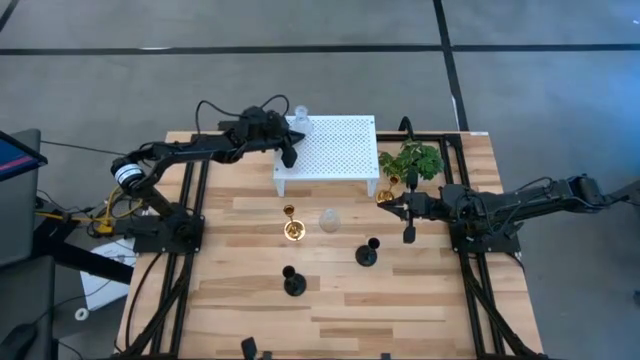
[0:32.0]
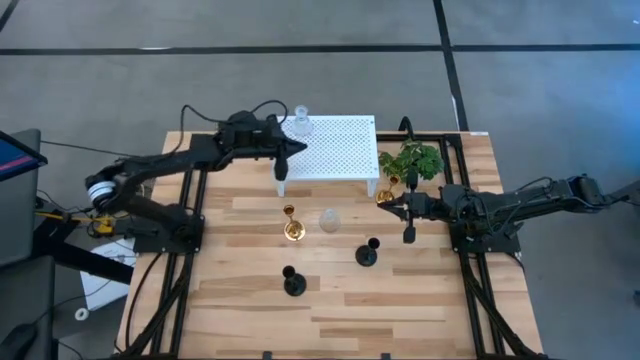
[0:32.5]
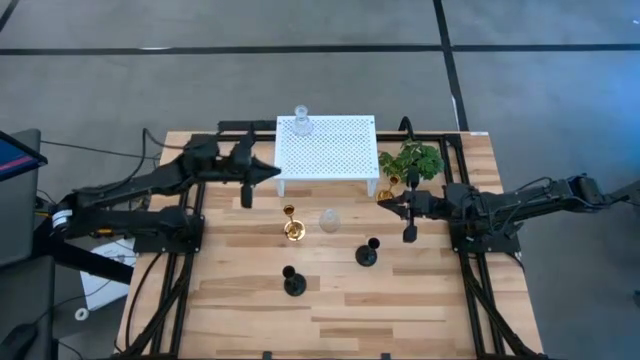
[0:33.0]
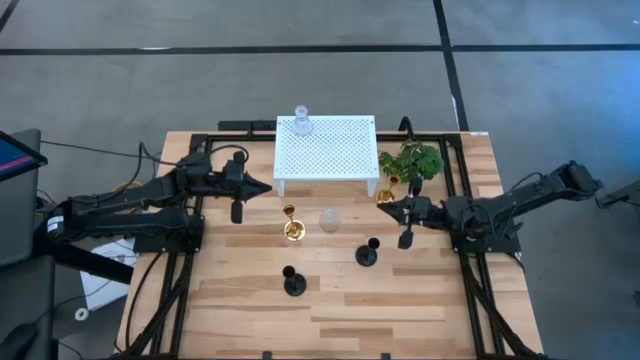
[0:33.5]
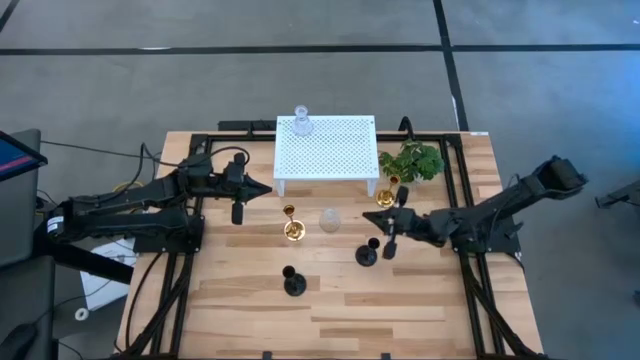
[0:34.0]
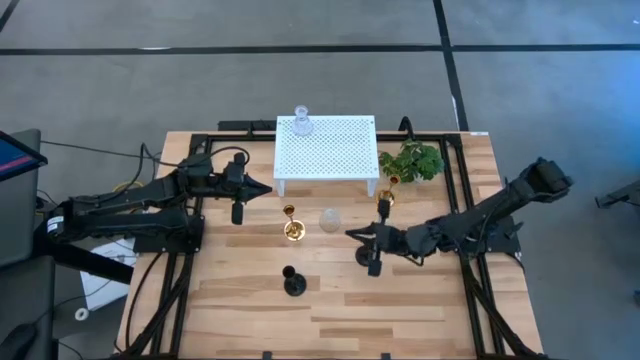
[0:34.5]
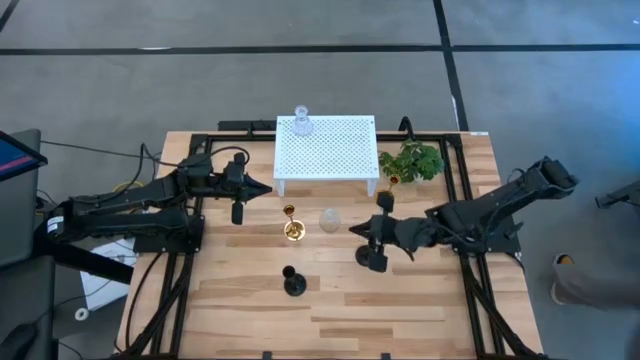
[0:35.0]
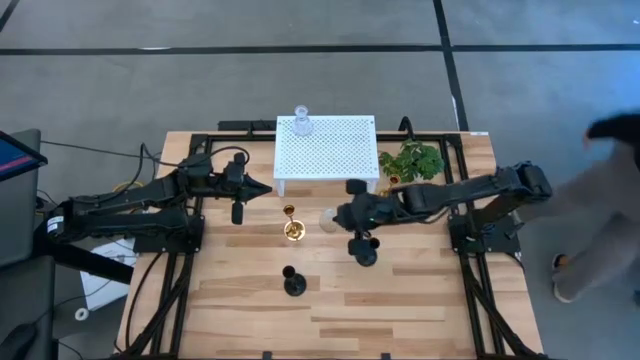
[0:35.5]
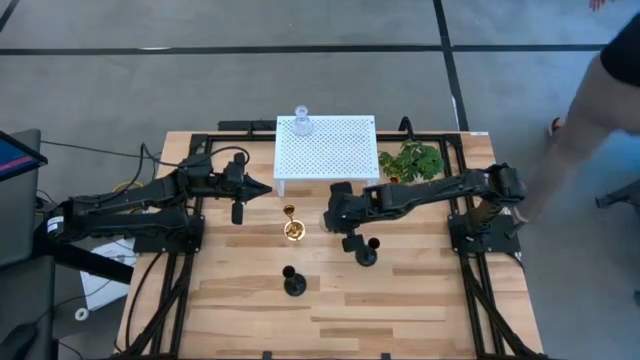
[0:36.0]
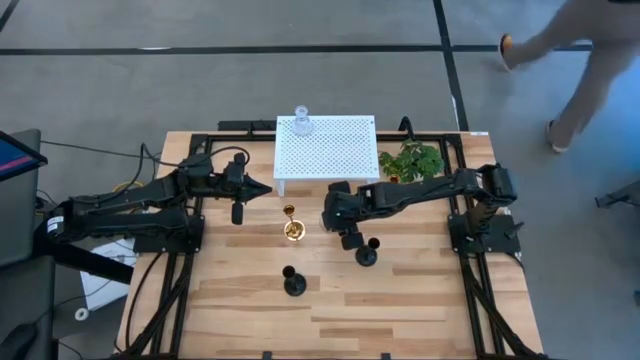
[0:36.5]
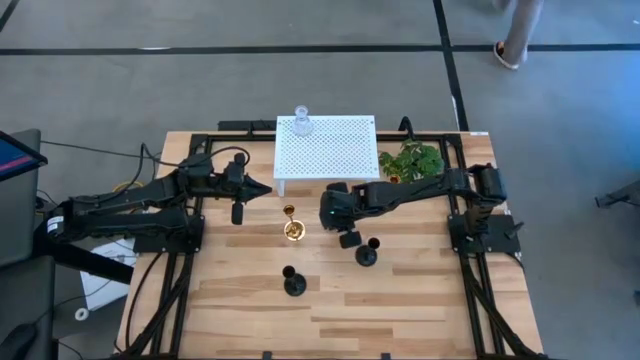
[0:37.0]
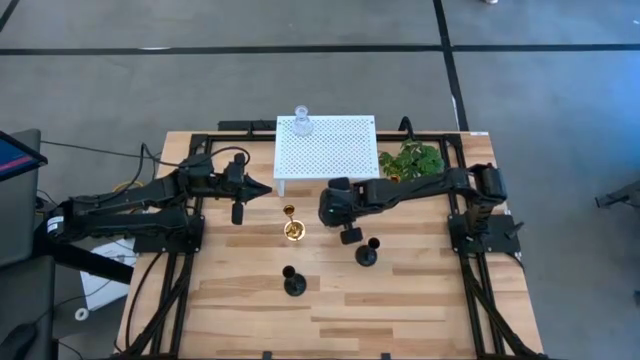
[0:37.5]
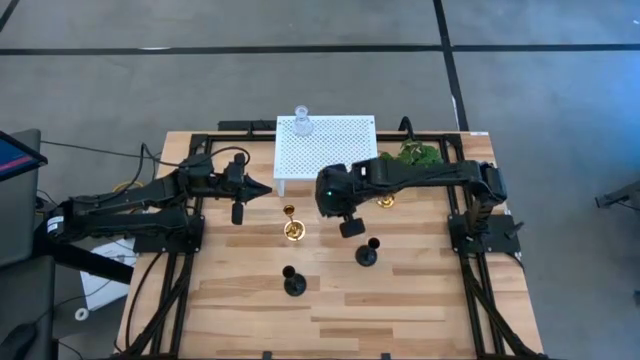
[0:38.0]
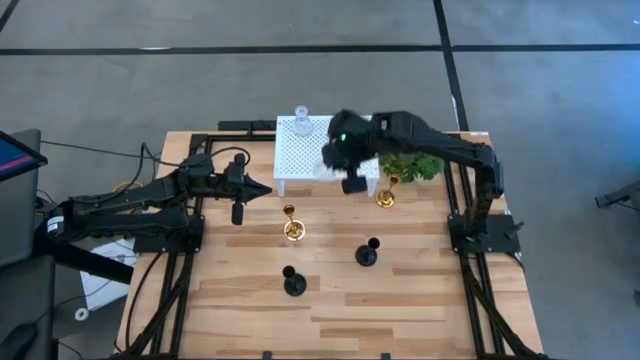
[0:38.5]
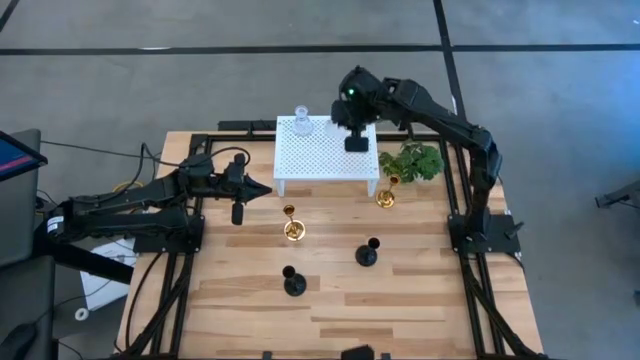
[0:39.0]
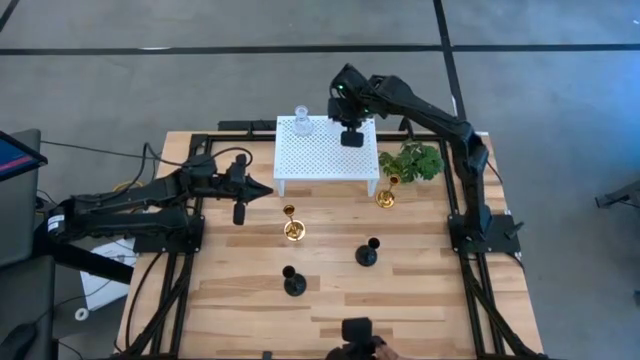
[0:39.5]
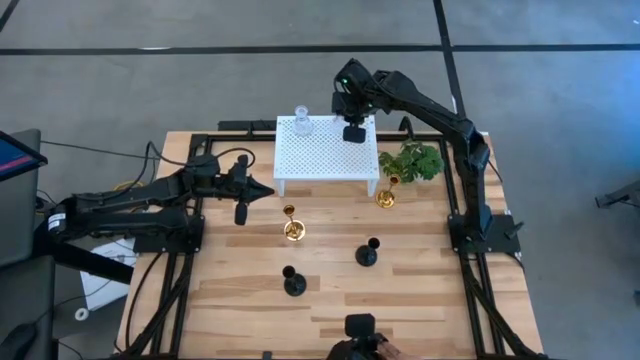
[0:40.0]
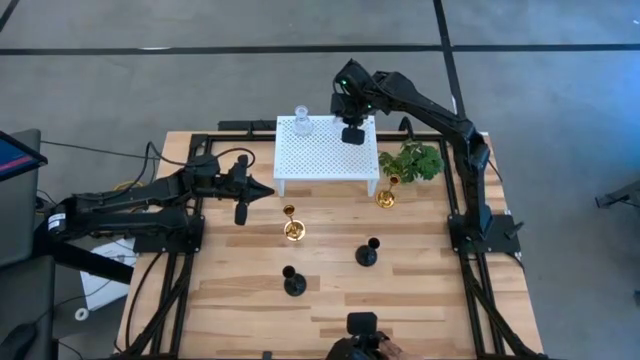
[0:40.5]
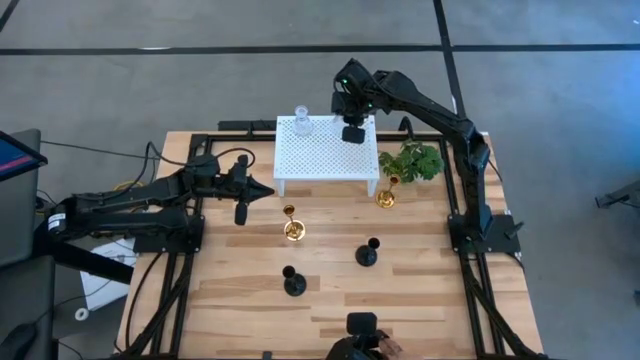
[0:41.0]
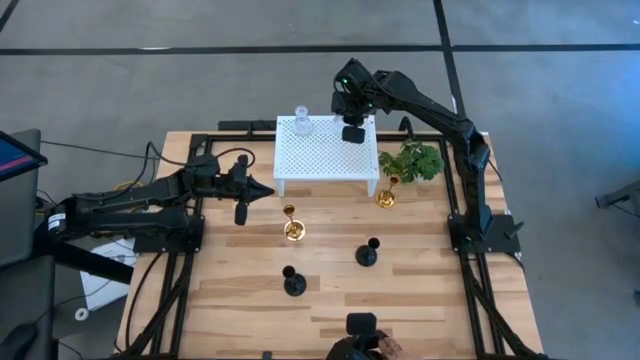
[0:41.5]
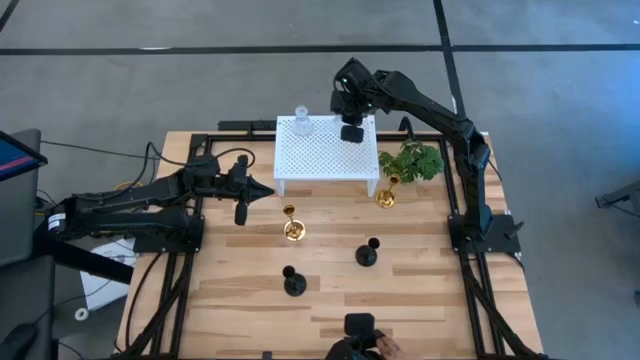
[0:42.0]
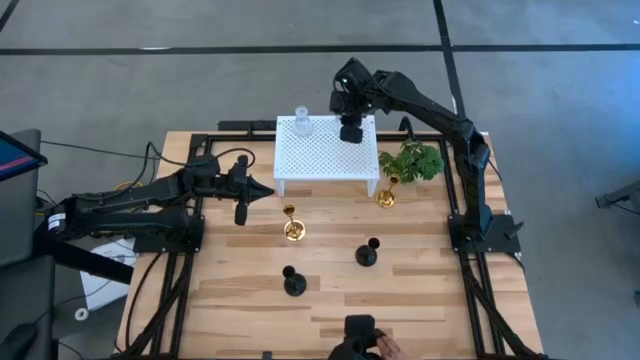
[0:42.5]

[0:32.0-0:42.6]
Task: Pick & Place candle stick holders
Put the transparent candle holder on the shelf aligned with the other transparent candle holder

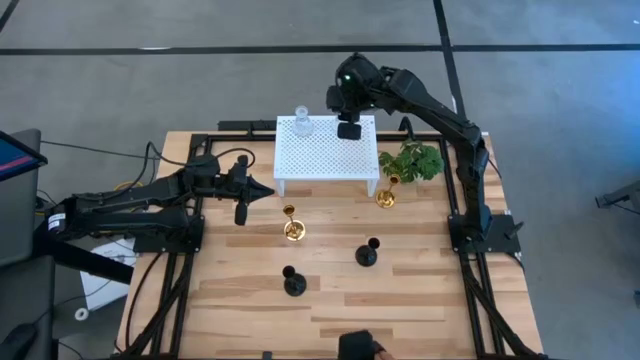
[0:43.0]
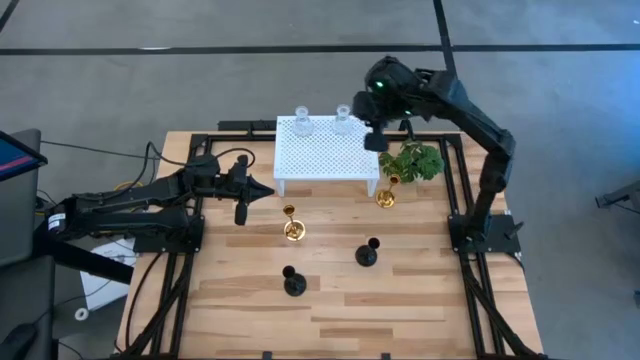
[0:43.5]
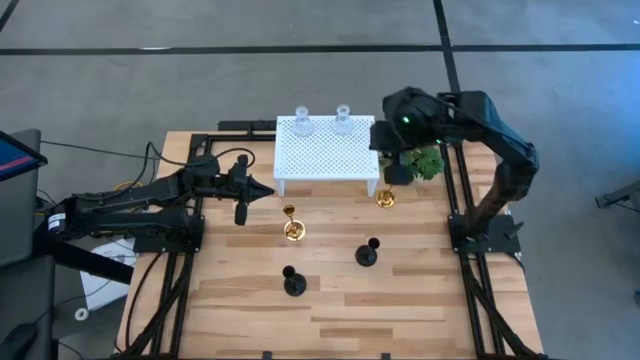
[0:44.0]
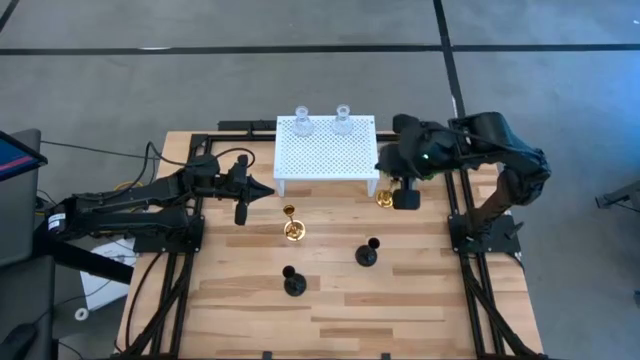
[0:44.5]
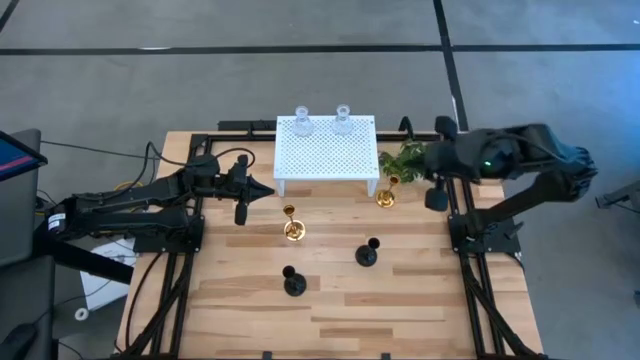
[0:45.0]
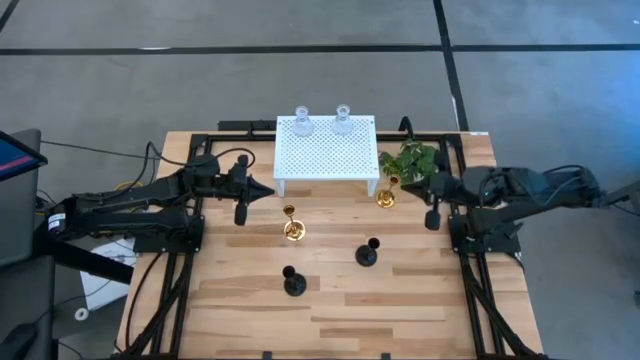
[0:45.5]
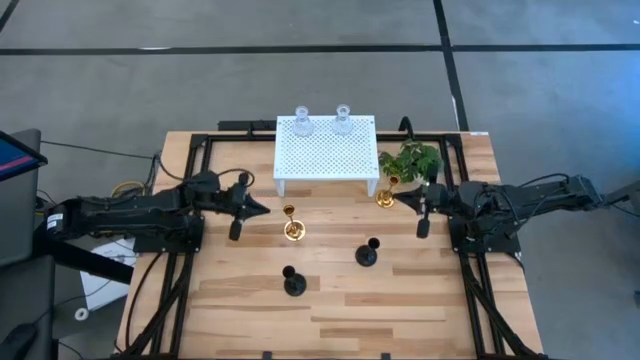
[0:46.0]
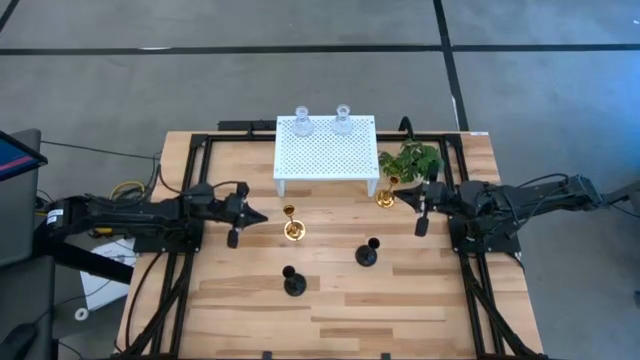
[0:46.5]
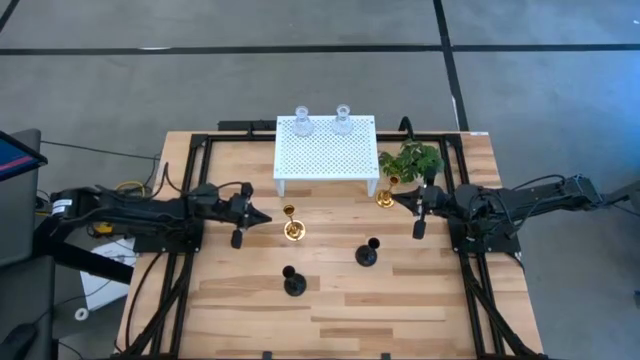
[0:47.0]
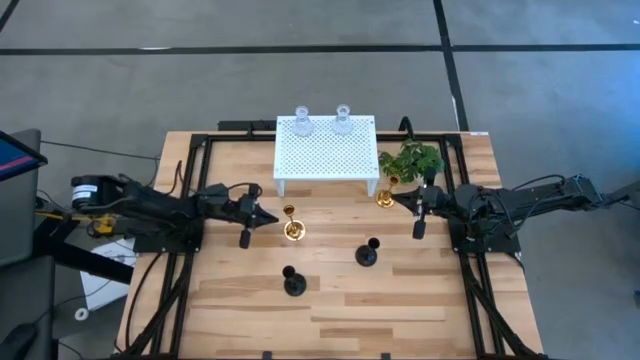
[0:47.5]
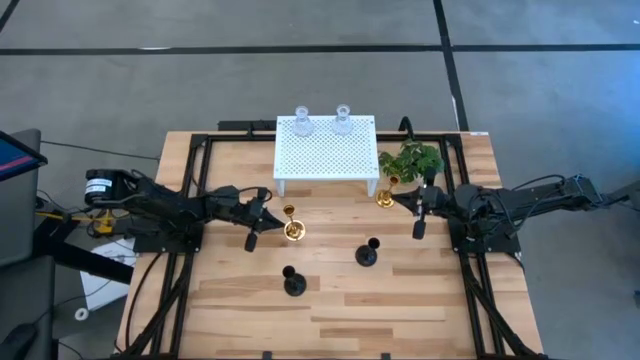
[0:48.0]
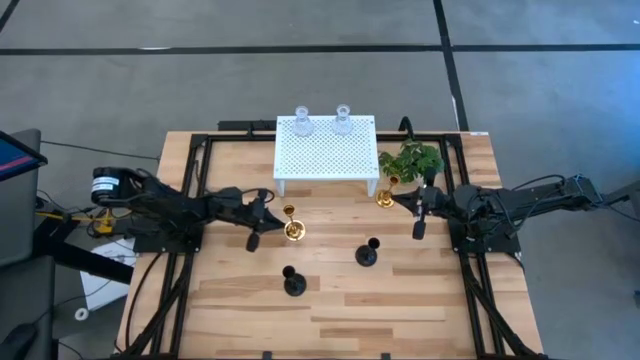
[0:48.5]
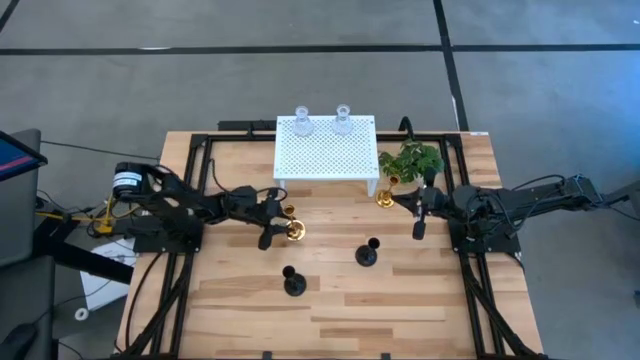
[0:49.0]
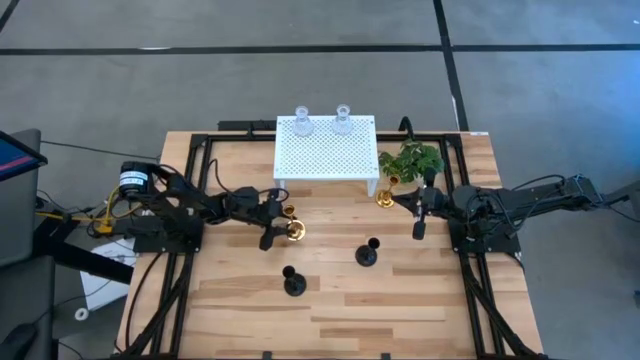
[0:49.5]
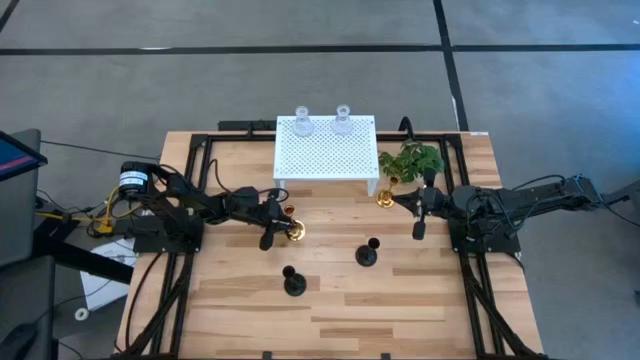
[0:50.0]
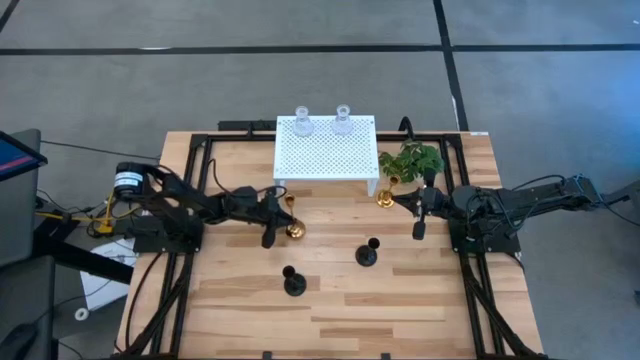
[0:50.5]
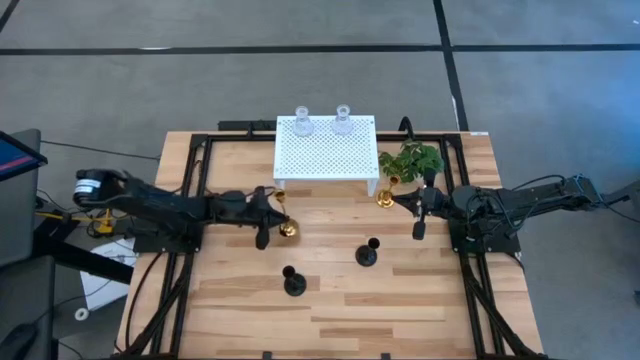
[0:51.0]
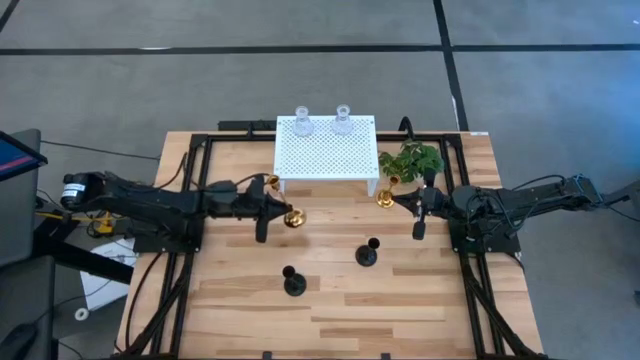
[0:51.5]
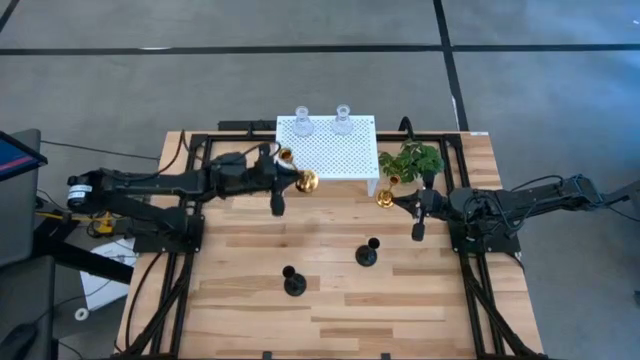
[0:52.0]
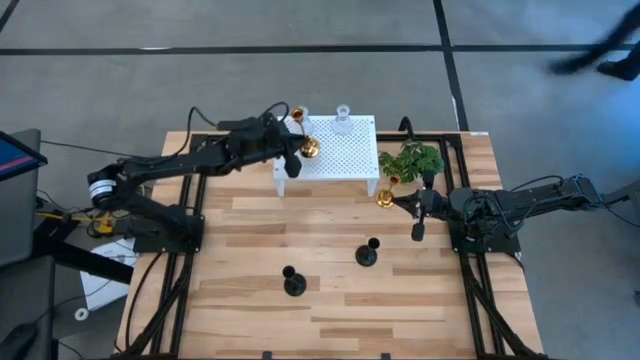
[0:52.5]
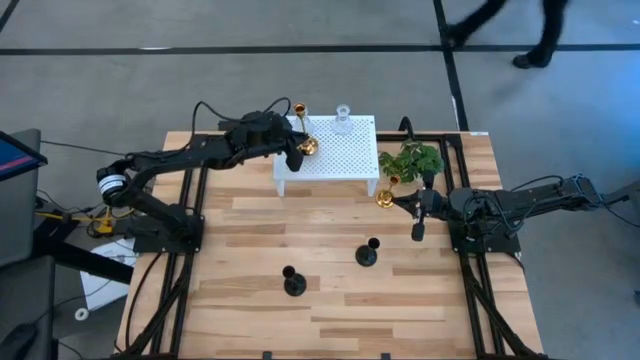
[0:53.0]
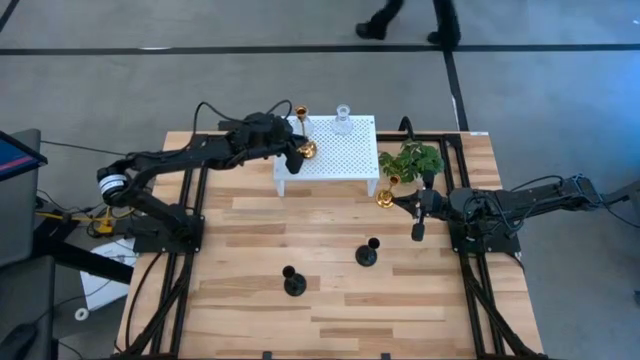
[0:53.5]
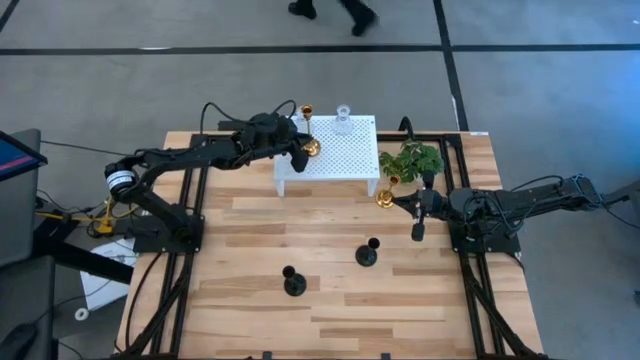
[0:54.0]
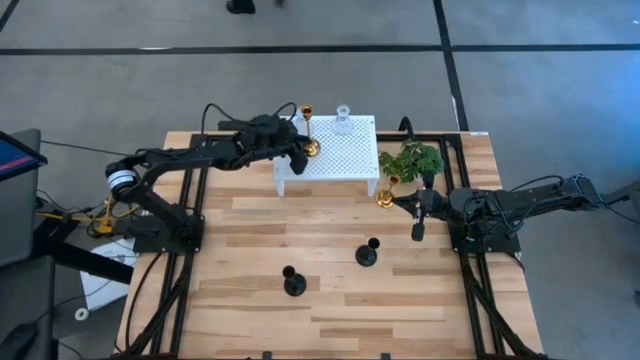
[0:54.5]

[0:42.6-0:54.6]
Put the left gold candle holder on the shelf
